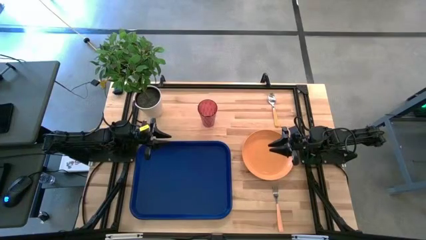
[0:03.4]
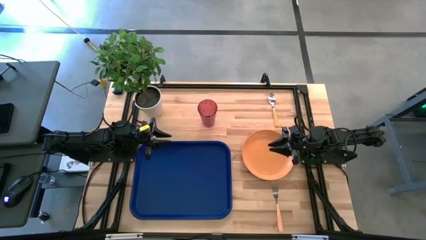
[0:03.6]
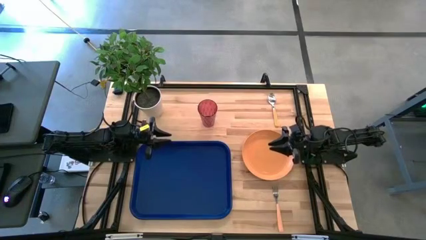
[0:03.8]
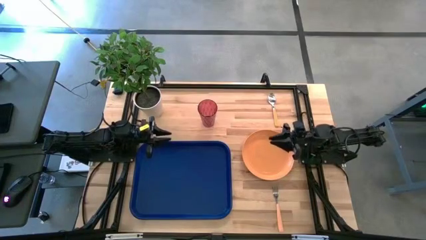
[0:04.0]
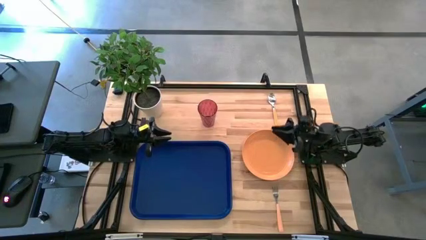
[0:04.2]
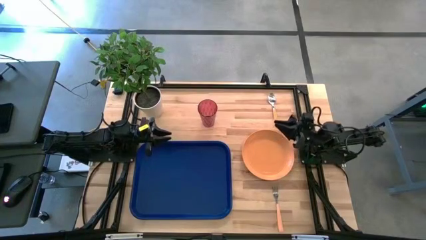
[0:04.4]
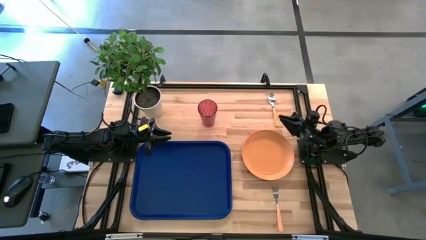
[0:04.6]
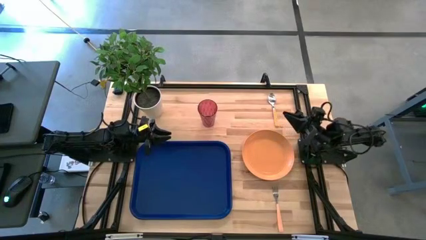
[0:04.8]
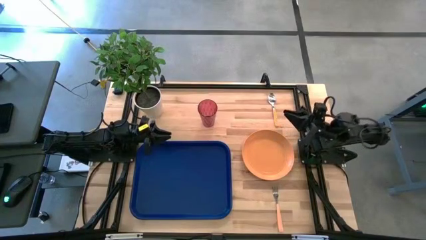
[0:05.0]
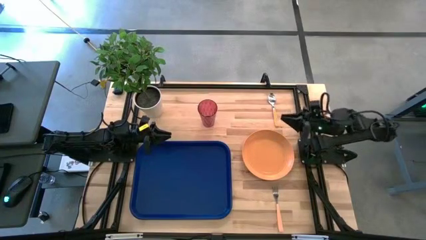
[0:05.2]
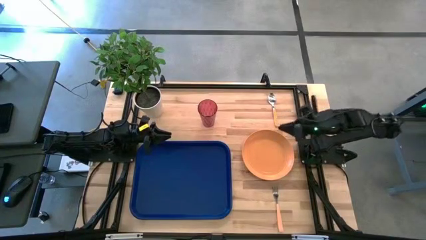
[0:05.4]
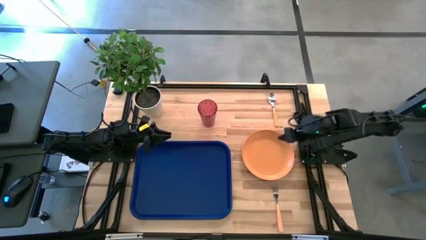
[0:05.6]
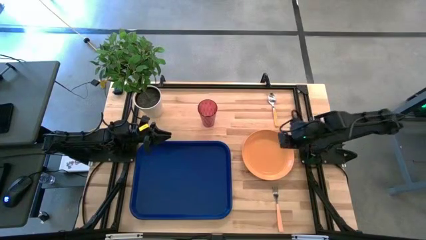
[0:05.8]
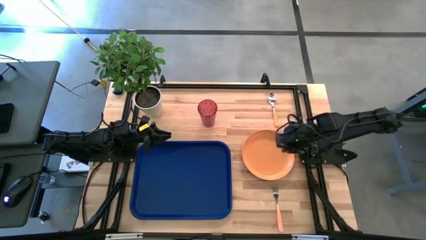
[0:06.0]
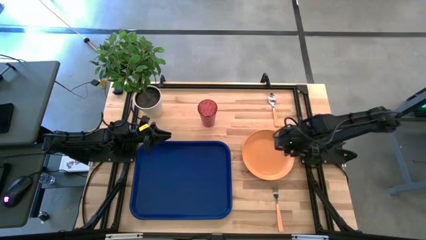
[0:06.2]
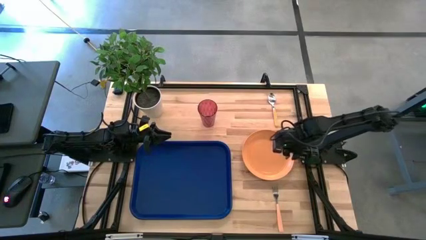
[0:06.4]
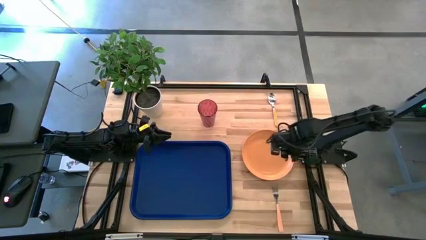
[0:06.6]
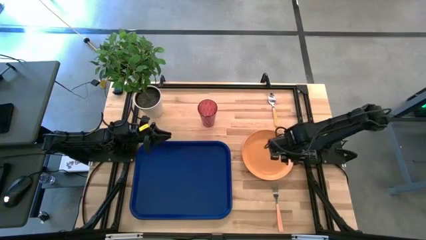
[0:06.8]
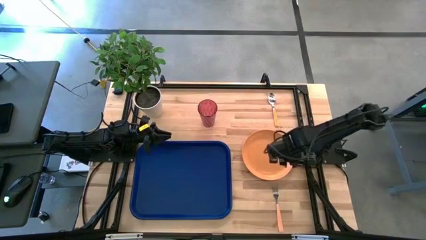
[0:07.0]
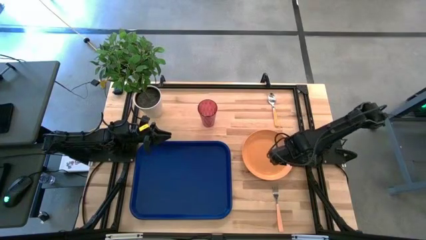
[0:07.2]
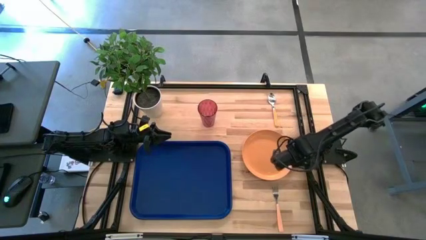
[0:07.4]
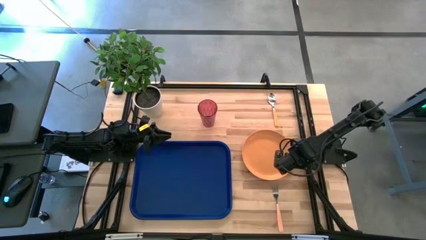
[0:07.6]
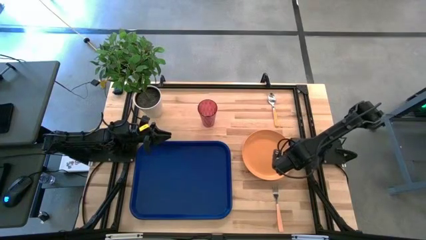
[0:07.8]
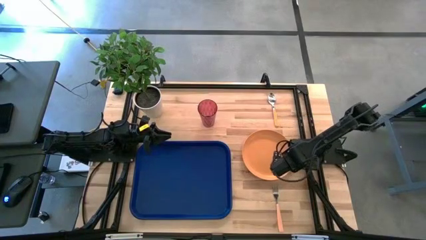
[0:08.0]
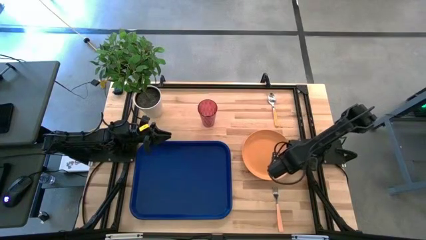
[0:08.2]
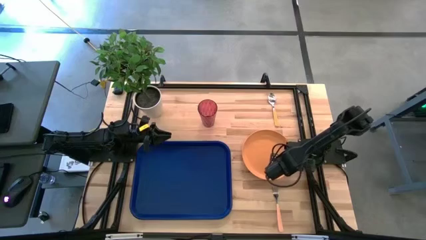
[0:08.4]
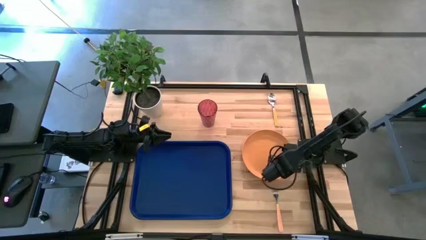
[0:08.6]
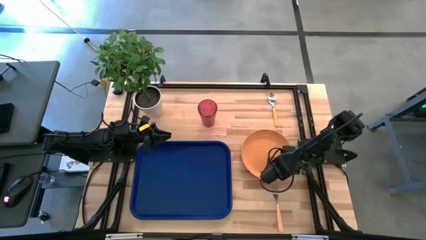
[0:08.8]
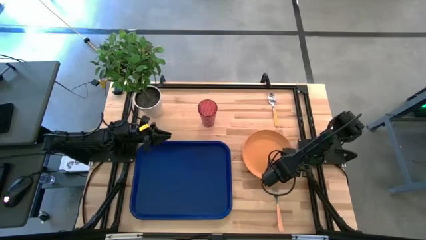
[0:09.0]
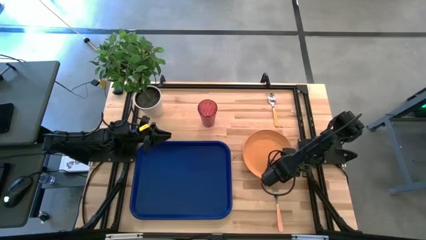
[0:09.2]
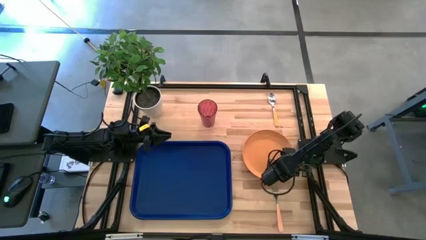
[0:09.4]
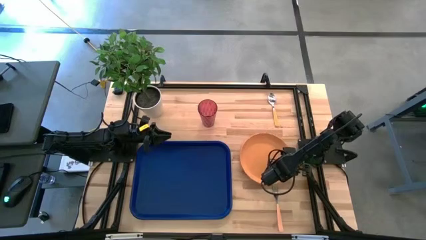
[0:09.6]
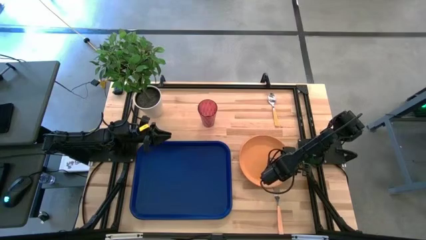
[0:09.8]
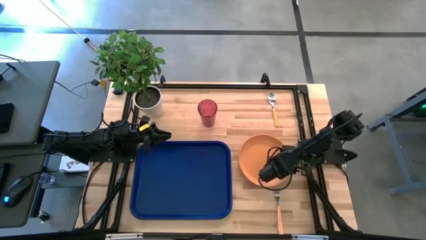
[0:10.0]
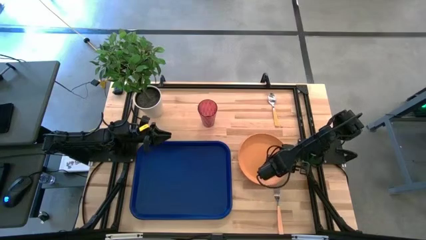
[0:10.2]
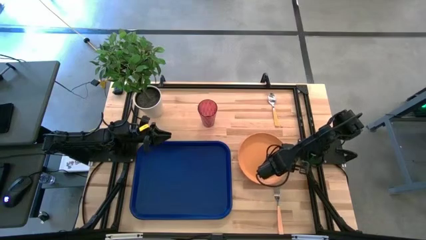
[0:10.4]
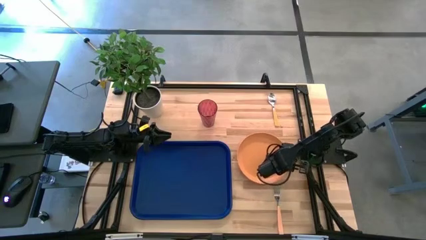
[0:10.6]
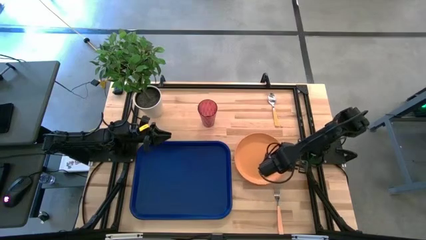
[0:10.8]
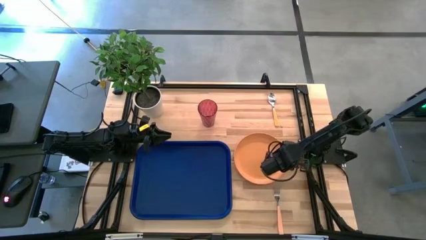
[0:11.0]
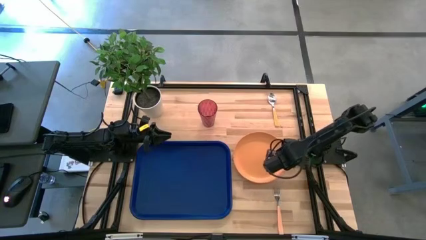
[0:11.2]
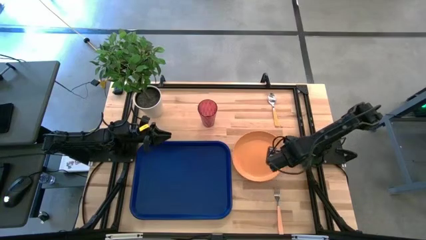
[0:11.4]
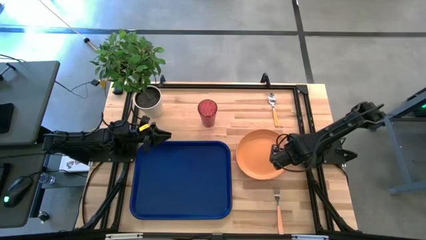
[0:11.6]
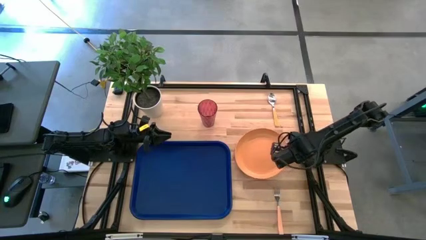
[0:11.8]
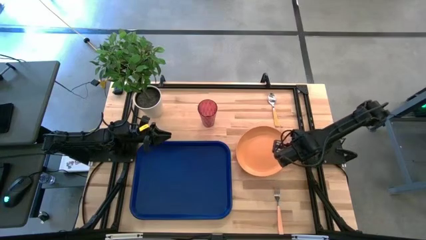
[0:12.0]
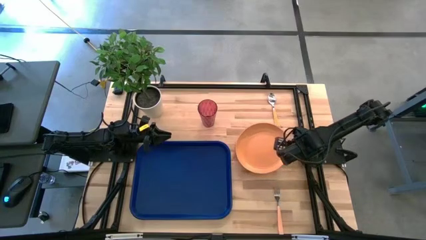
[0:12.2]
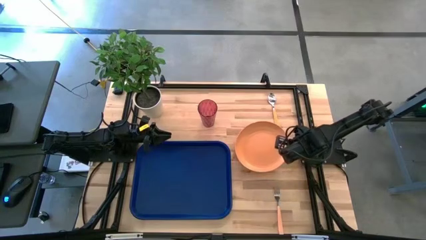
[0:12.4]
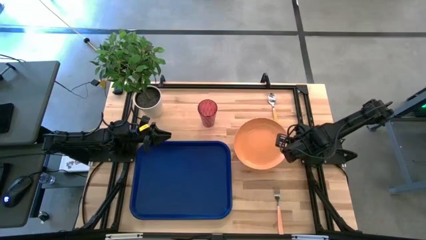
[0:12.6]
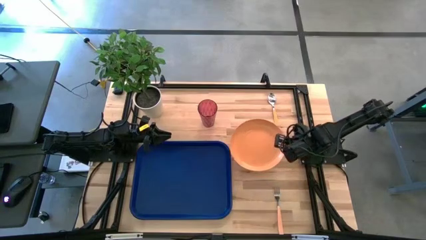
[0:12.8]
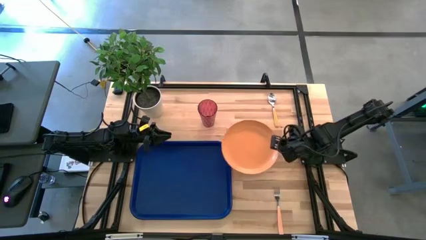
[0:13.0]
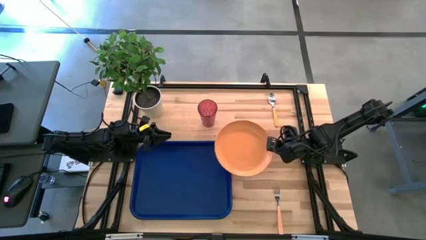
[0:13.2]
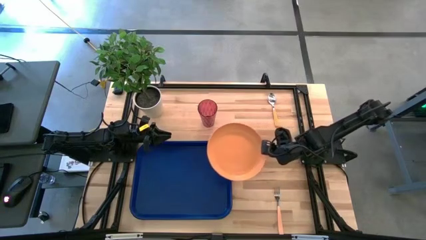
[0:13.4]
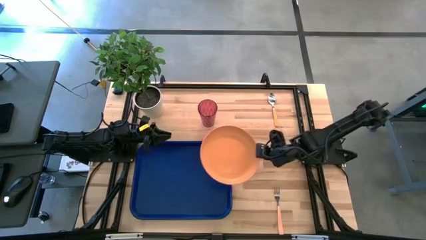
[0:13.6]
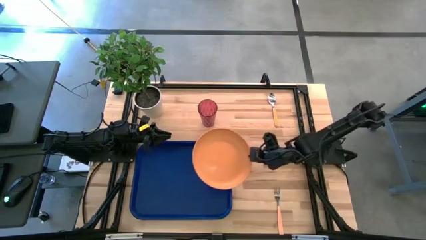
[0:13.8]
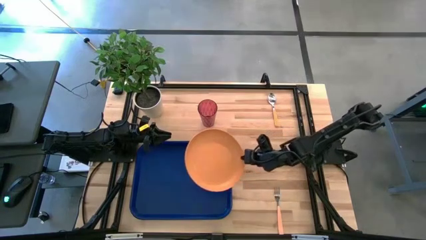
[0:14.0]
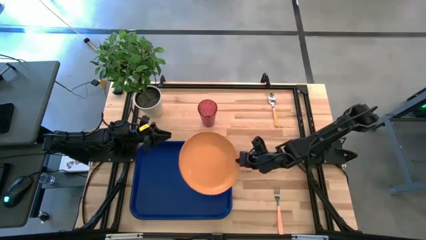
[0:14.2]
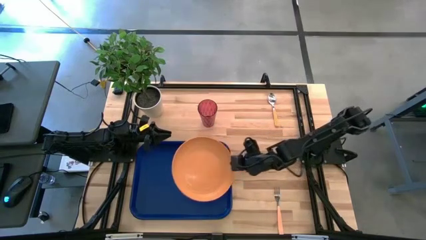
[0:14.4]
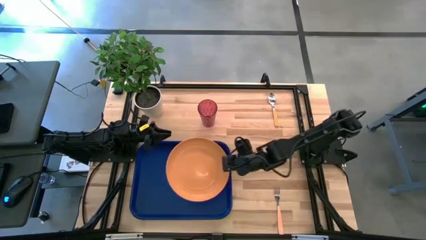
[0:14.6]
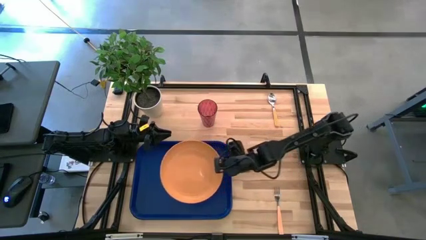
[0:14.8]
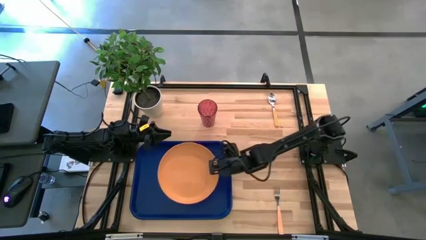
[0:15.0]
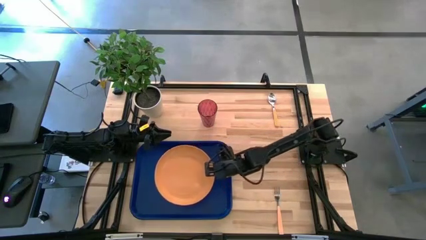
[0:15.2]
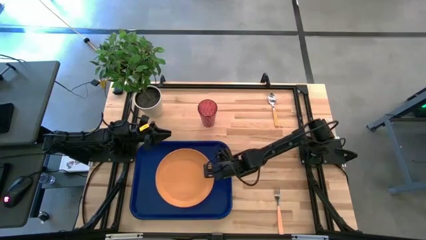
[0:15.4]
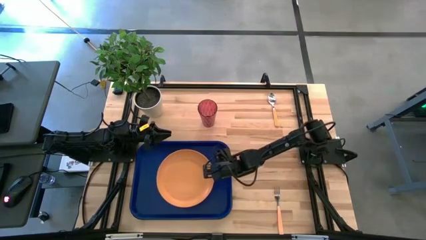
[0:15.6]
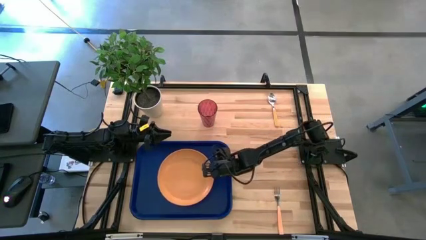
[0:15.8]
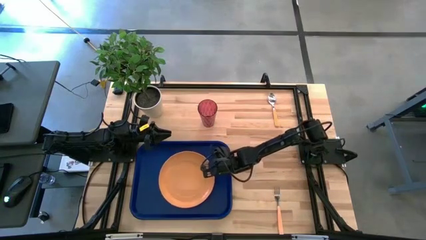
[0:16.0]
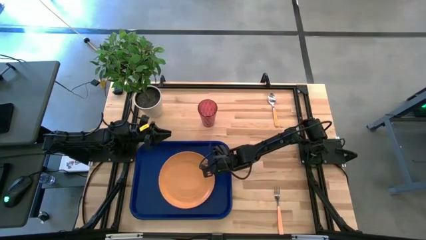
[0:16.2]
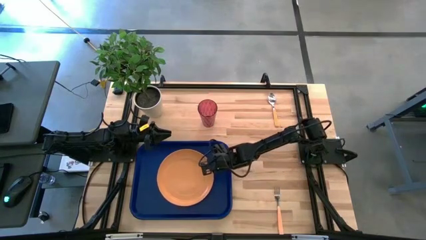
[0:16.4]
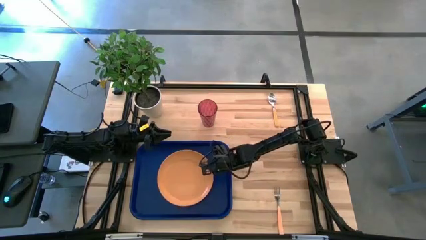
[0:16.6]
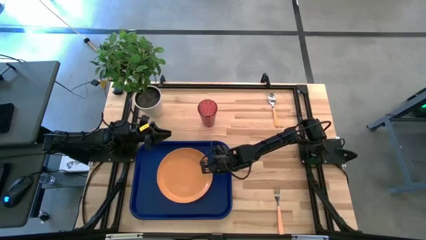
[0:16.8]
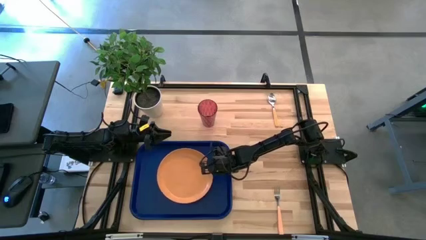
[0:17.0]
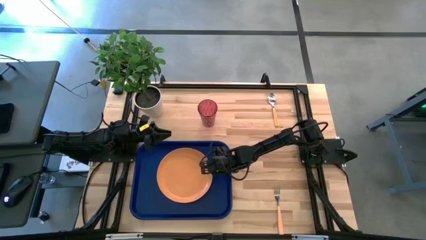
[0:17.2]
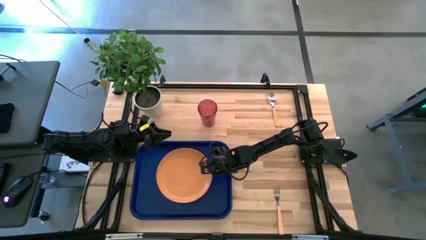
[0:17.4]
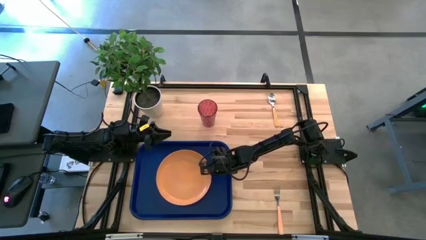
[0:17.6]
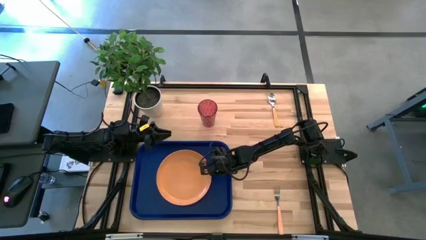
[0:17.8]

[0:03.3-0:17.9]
Task: Pick and place plate/cup/fork/spoon on tray
Put the orange plate on the center of the blue tray
